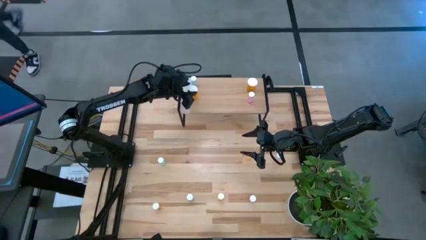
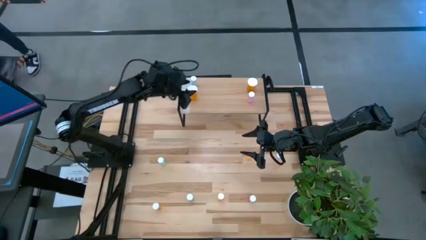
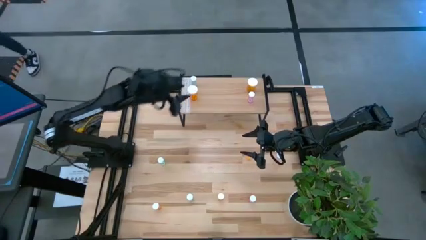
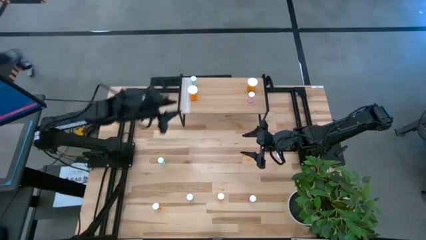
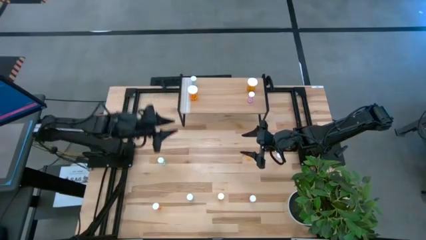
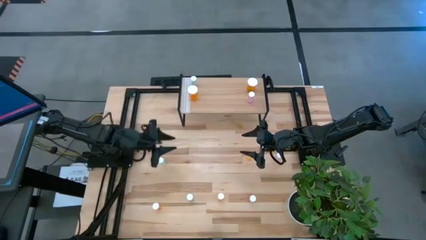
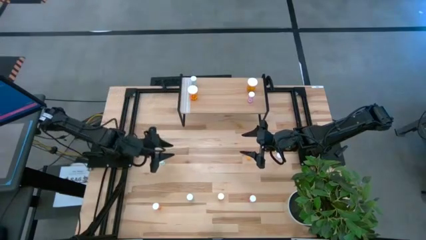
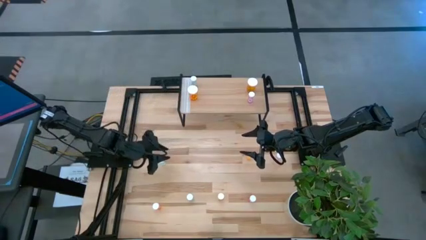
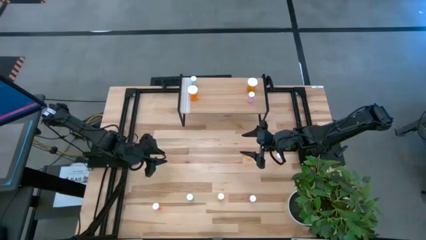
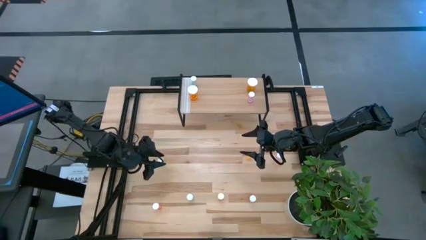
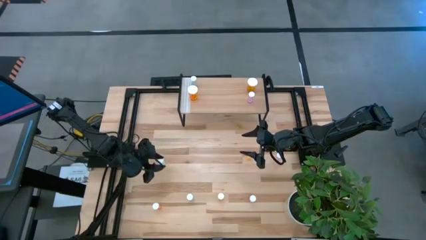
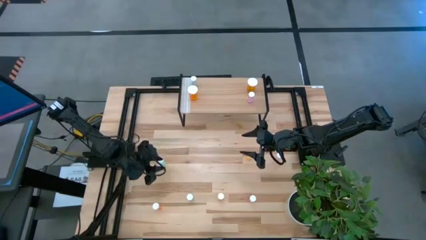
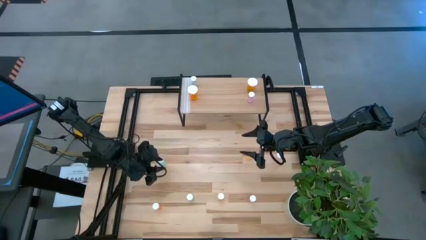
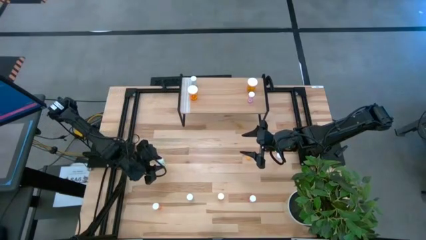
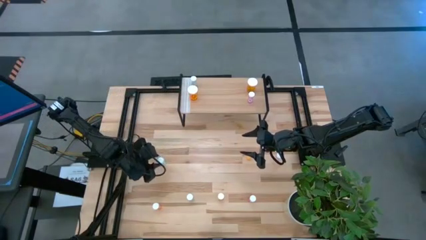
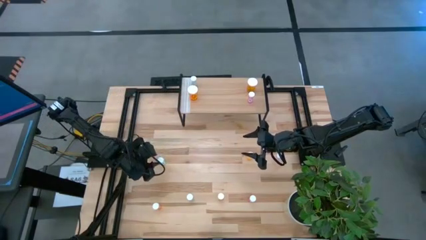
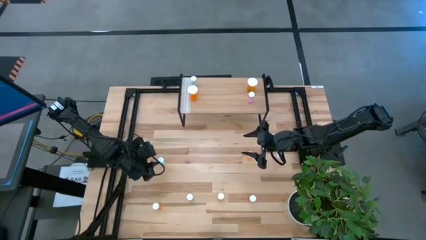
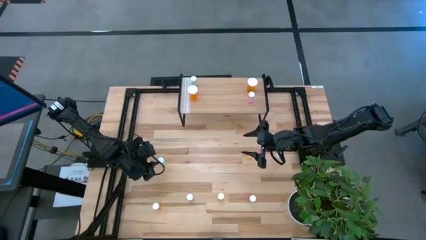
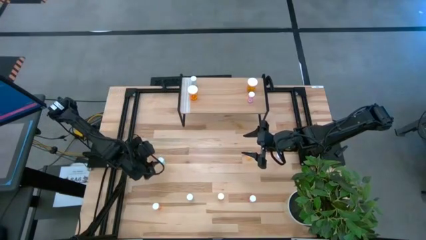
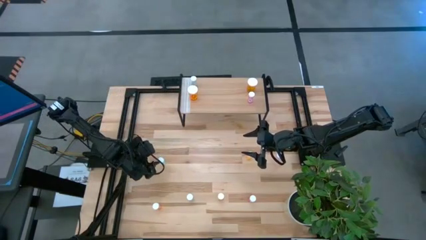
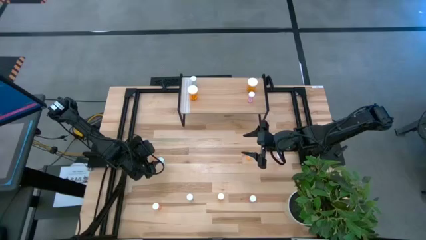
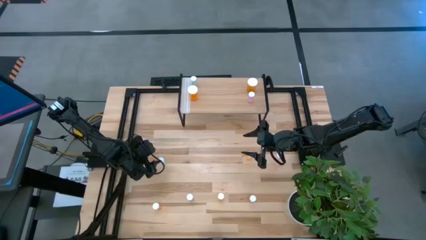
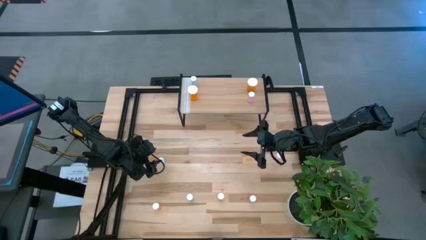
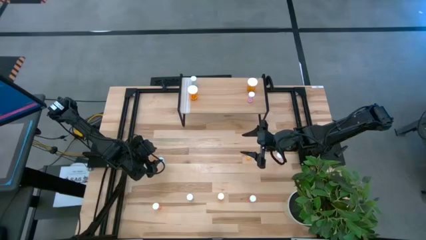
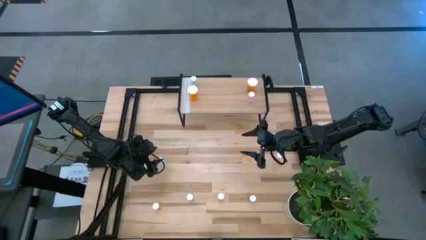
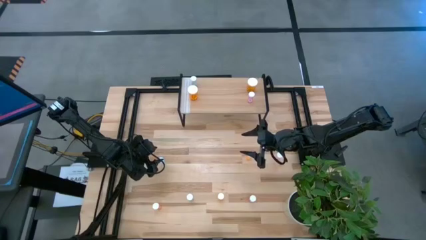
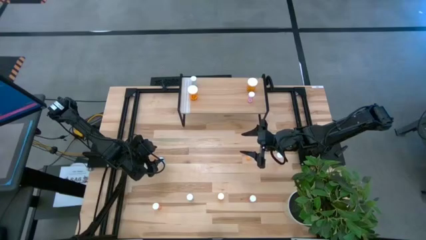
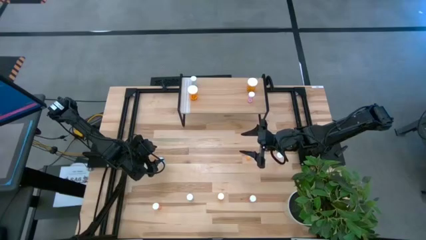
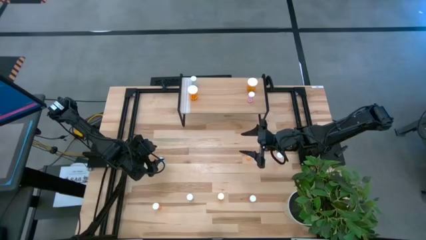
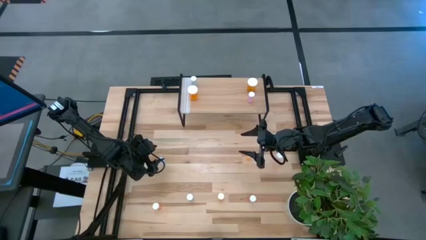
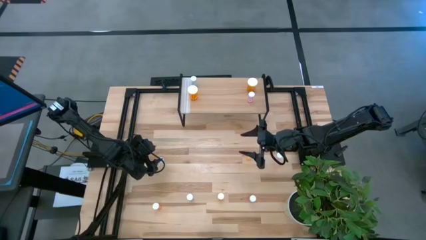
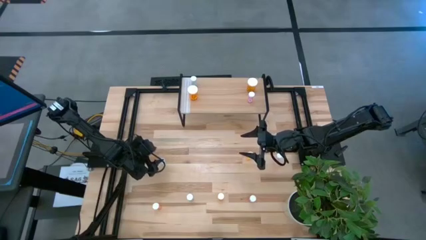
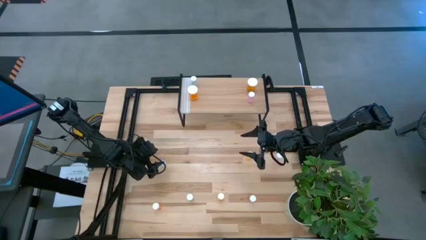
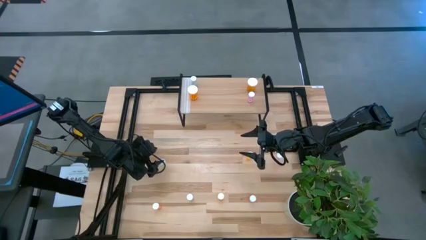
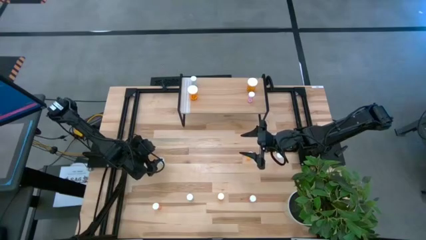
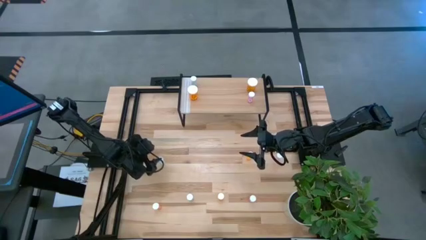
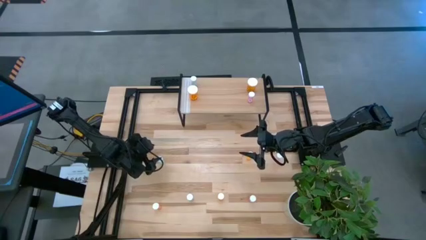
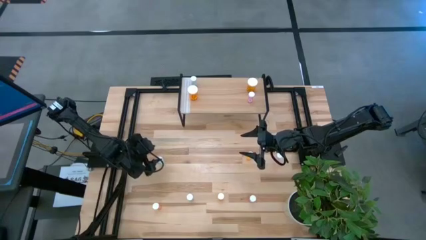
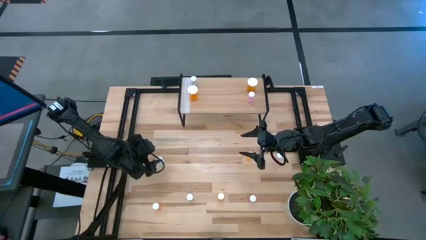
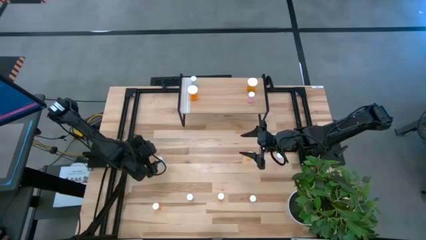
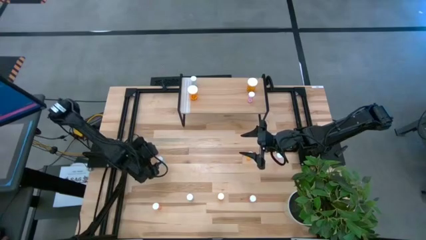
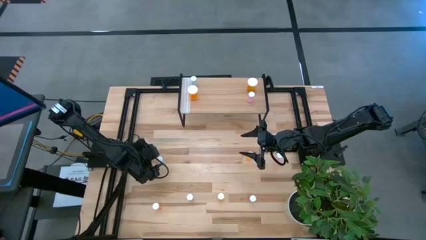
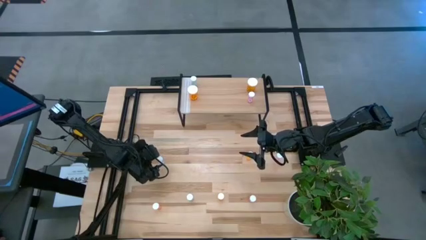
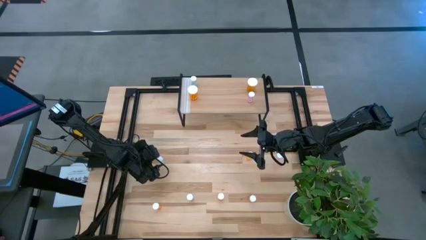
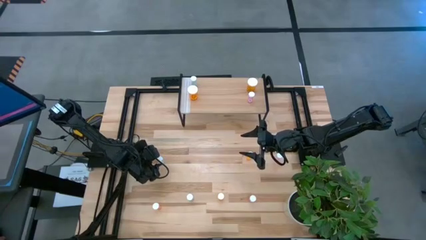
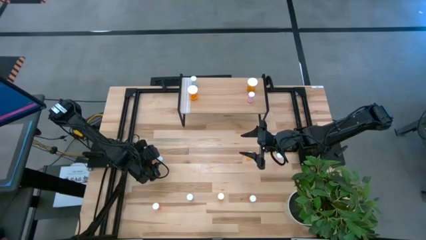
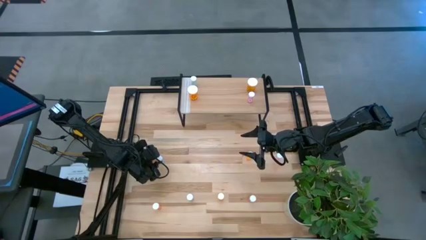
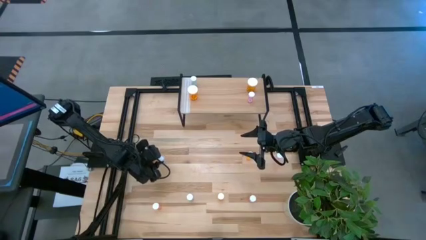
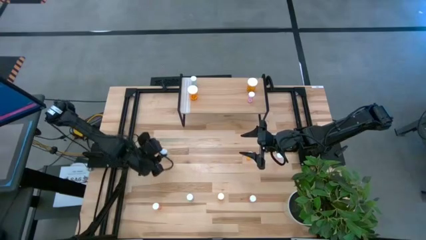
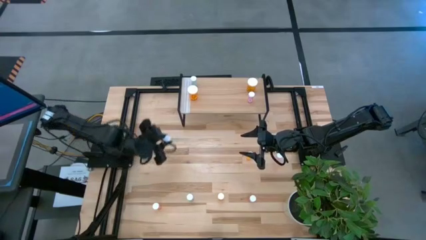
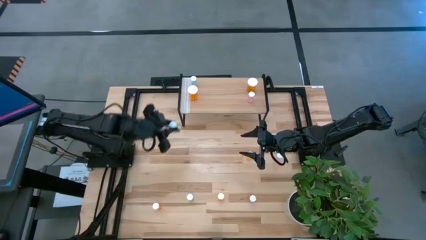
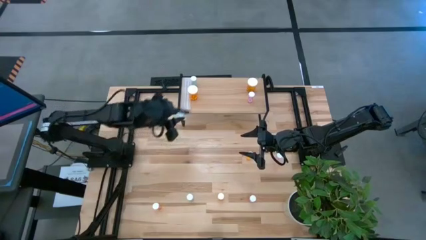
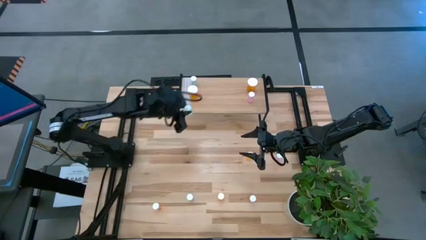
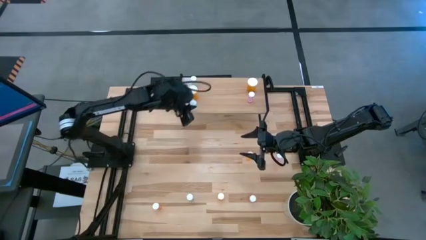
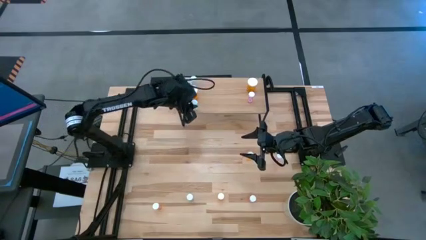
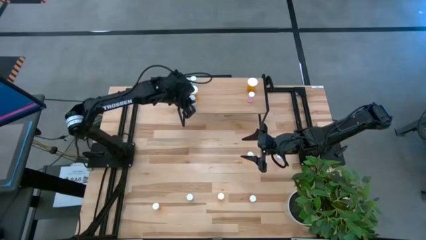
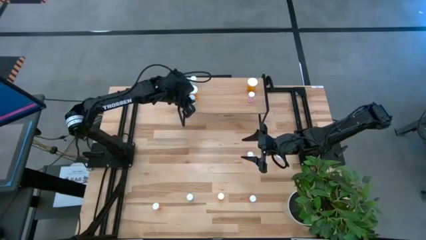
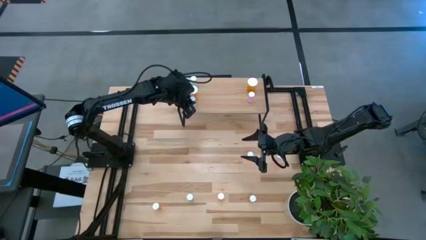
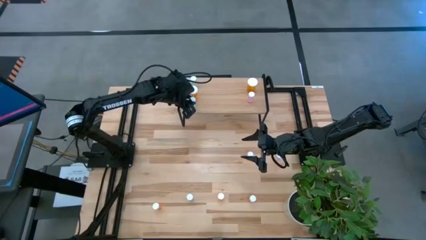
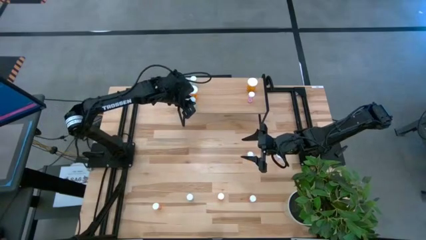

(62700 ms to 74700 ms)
Task: Pick and place medicine bottles onto shelf by color
Put the top blue pill bottle on the shelf
